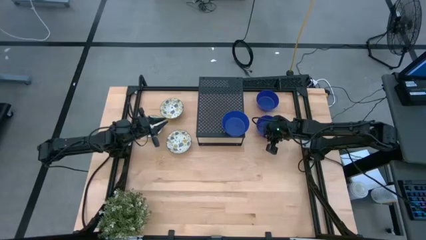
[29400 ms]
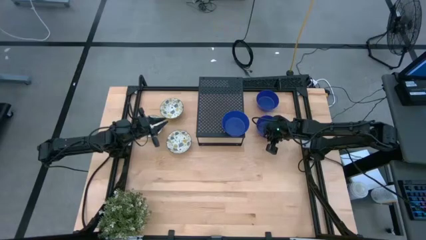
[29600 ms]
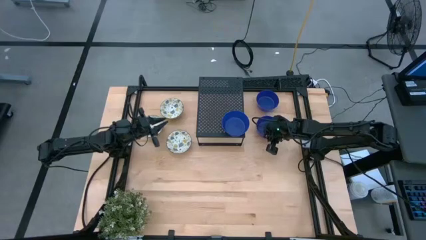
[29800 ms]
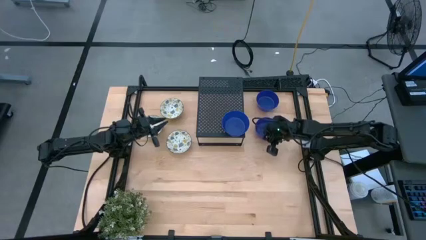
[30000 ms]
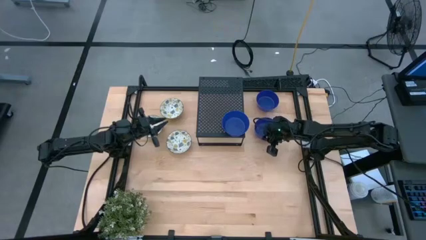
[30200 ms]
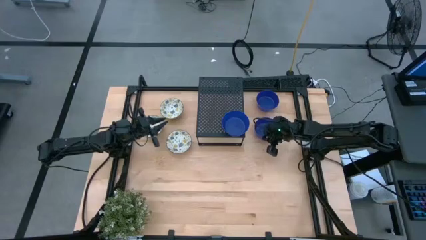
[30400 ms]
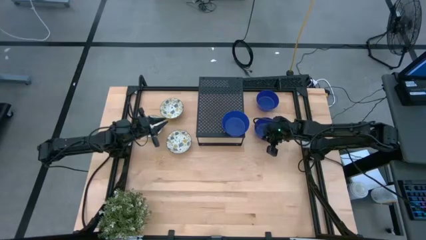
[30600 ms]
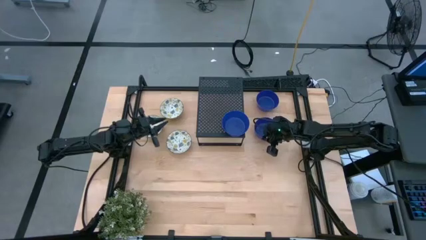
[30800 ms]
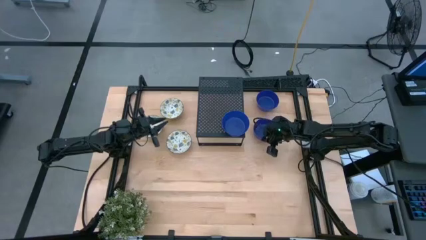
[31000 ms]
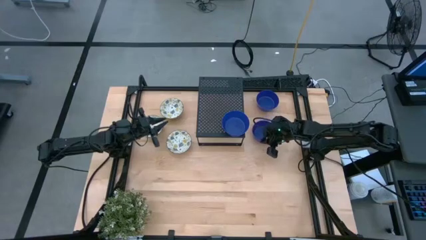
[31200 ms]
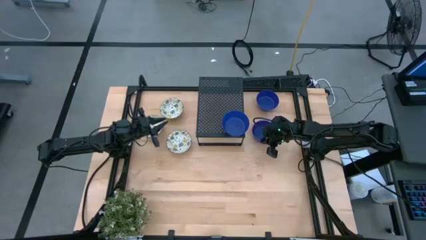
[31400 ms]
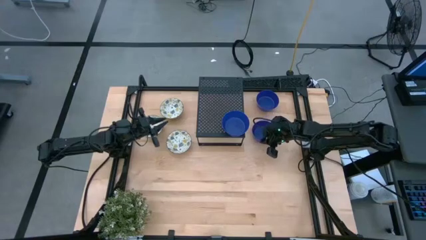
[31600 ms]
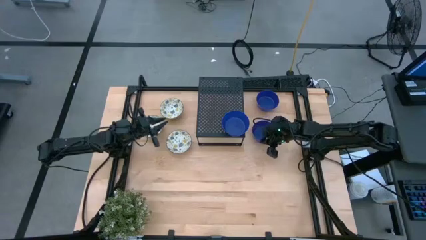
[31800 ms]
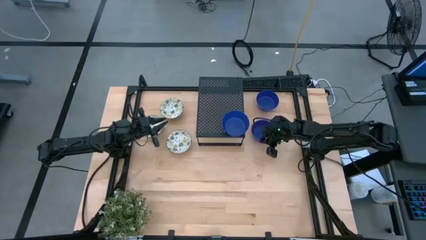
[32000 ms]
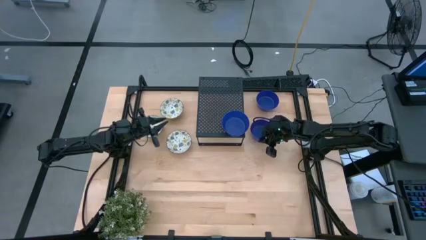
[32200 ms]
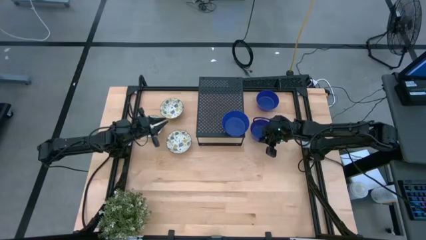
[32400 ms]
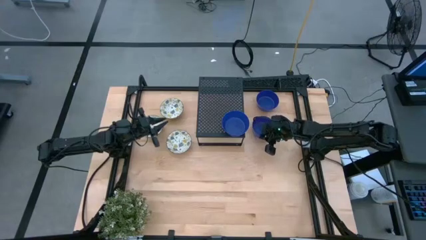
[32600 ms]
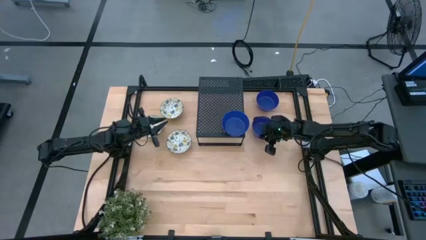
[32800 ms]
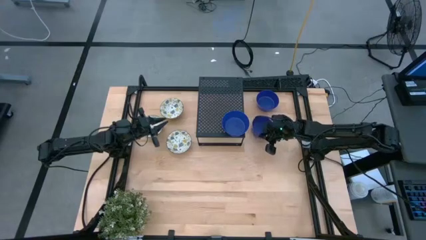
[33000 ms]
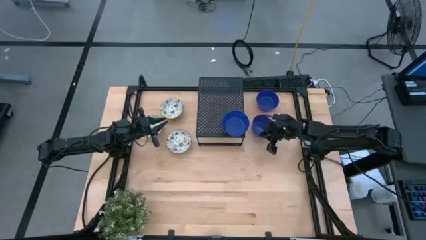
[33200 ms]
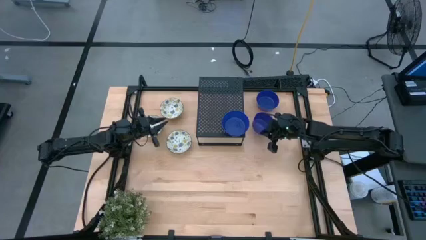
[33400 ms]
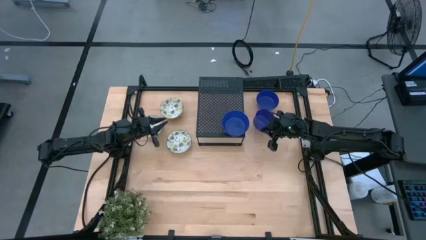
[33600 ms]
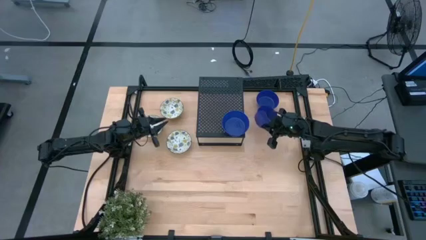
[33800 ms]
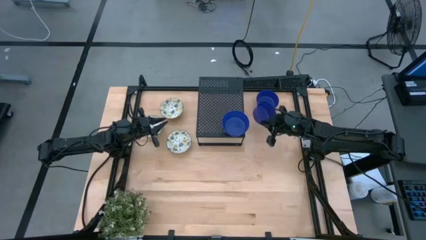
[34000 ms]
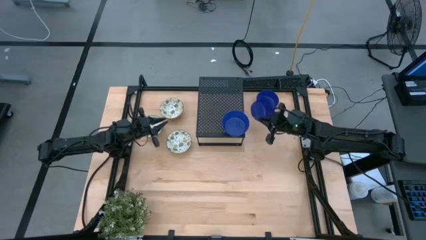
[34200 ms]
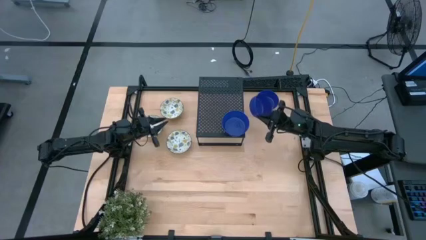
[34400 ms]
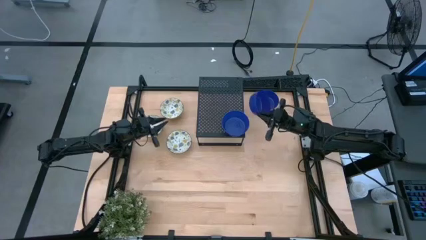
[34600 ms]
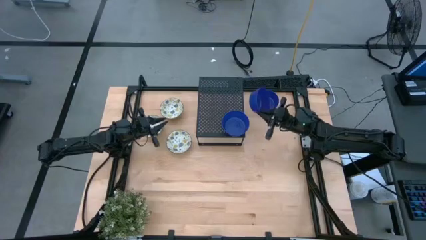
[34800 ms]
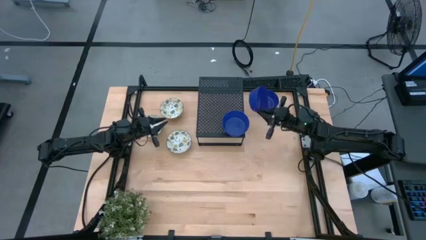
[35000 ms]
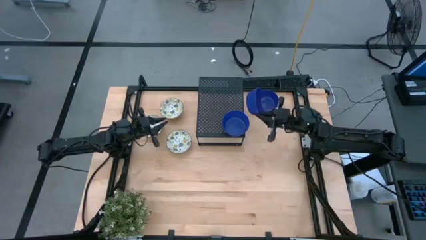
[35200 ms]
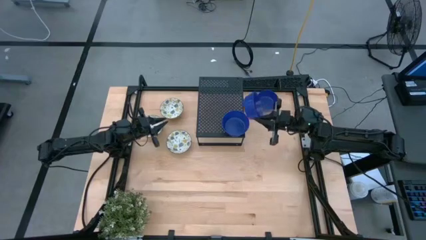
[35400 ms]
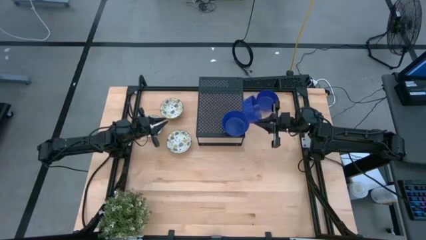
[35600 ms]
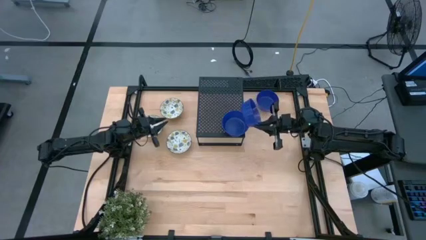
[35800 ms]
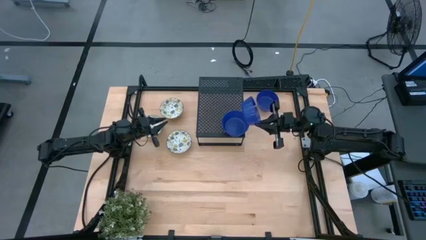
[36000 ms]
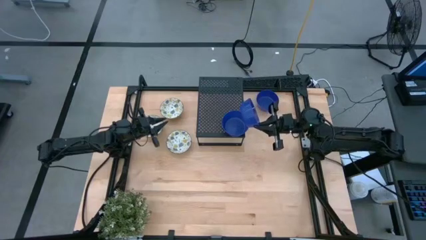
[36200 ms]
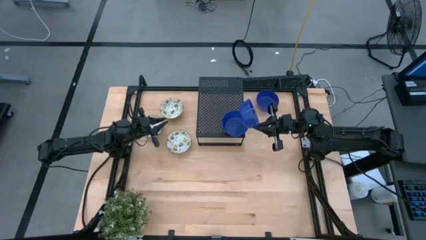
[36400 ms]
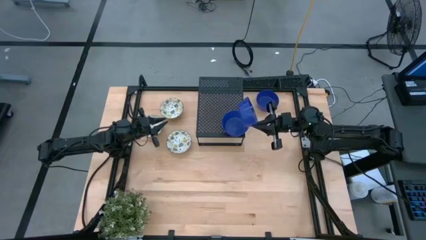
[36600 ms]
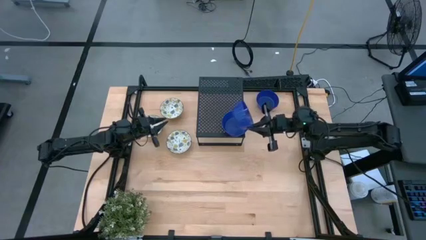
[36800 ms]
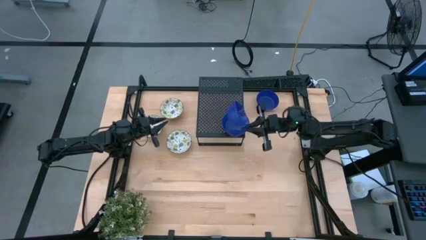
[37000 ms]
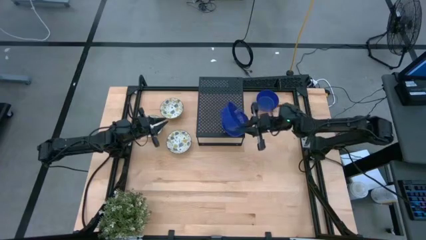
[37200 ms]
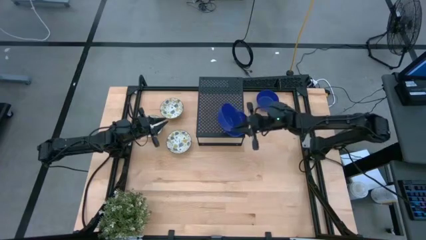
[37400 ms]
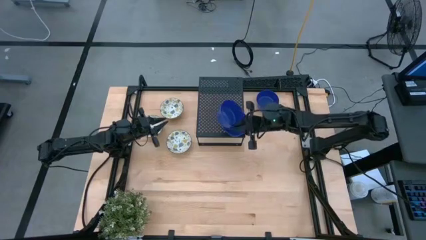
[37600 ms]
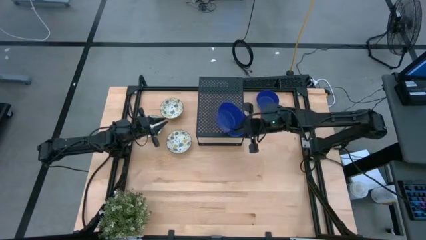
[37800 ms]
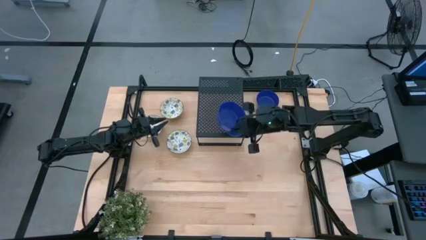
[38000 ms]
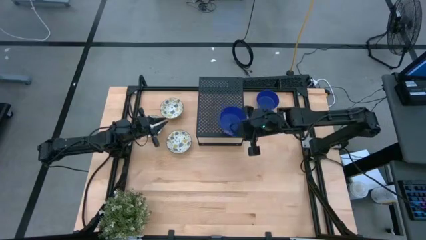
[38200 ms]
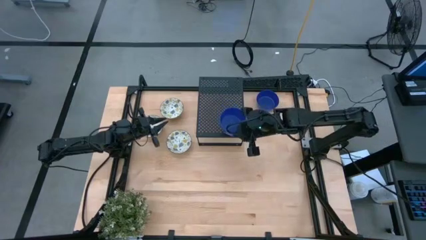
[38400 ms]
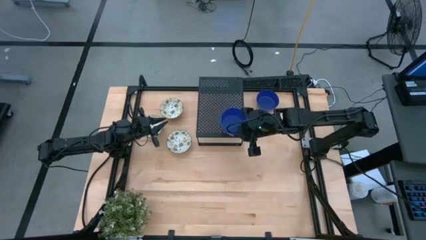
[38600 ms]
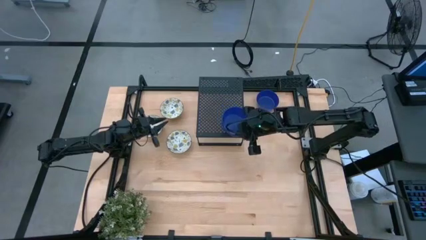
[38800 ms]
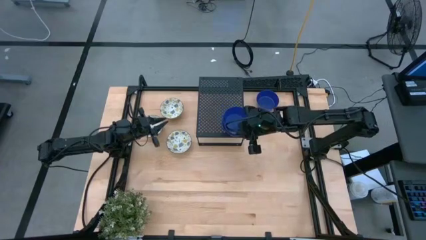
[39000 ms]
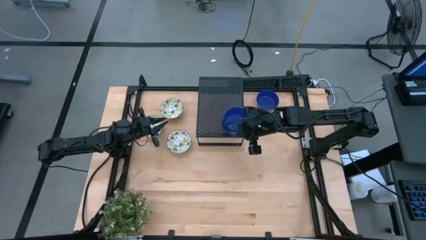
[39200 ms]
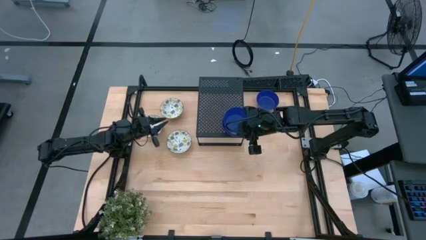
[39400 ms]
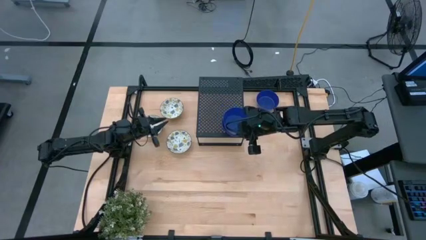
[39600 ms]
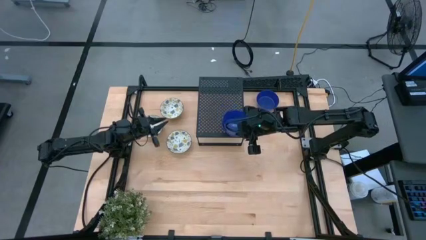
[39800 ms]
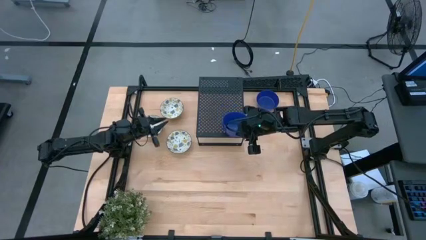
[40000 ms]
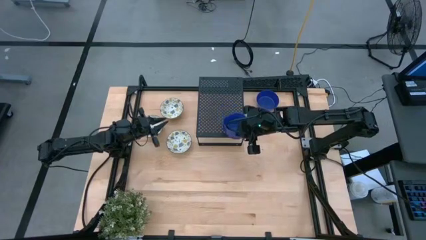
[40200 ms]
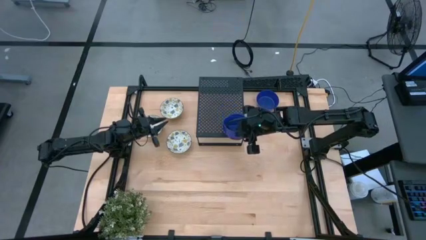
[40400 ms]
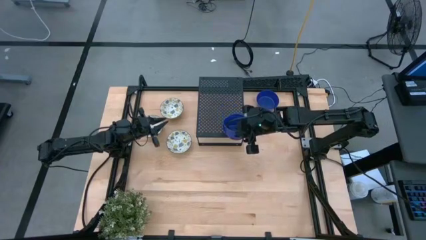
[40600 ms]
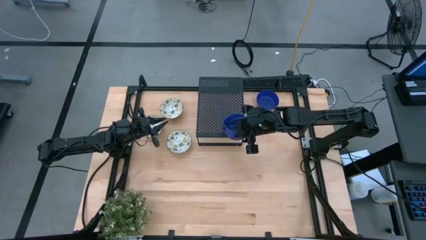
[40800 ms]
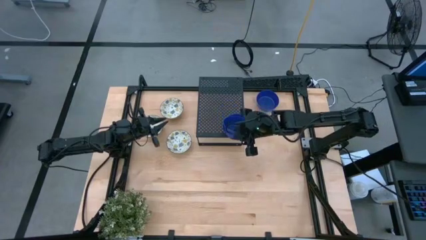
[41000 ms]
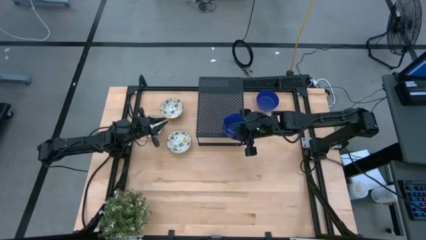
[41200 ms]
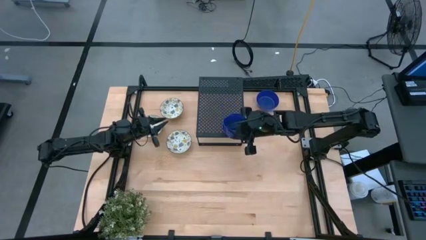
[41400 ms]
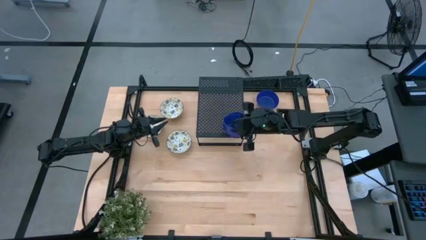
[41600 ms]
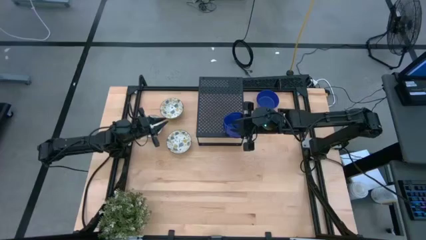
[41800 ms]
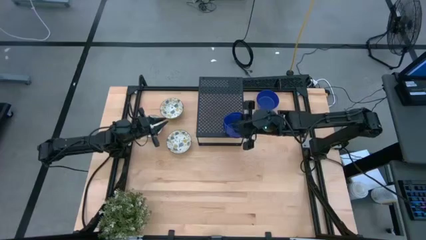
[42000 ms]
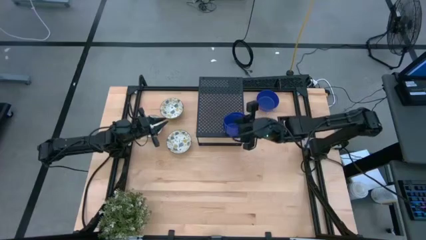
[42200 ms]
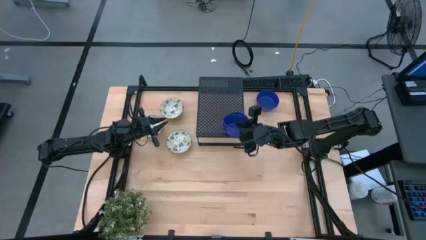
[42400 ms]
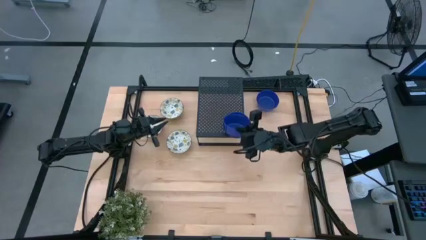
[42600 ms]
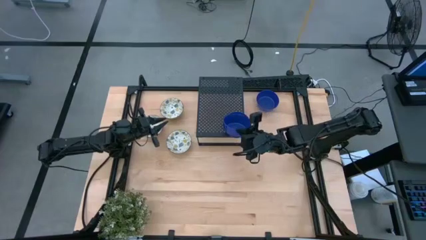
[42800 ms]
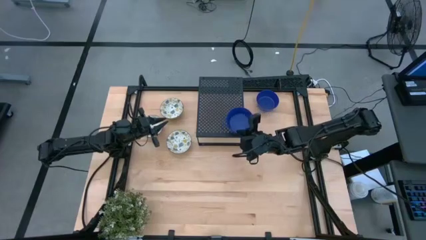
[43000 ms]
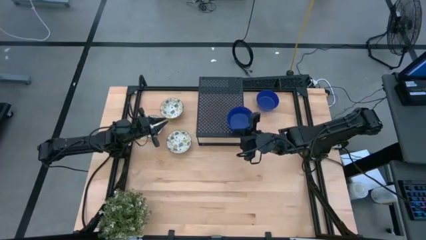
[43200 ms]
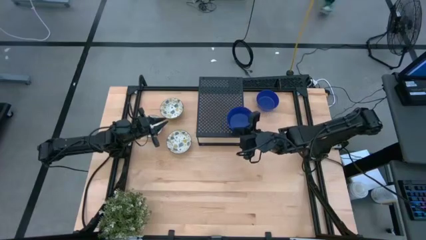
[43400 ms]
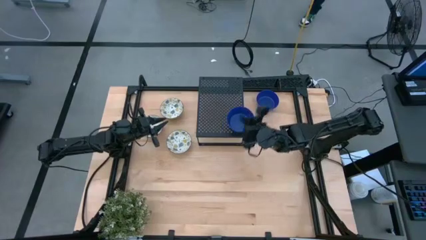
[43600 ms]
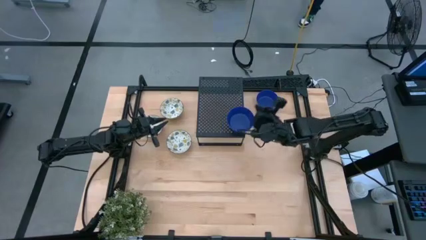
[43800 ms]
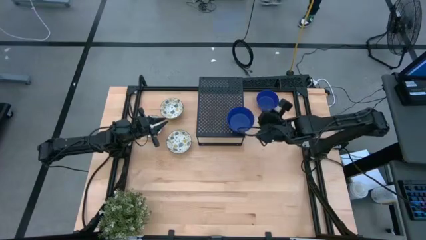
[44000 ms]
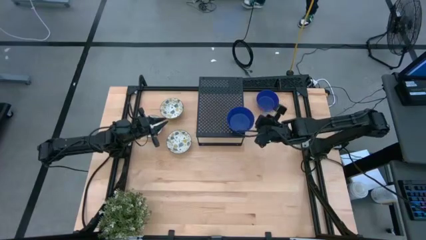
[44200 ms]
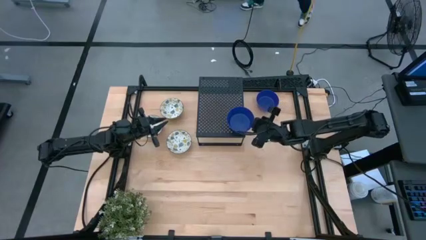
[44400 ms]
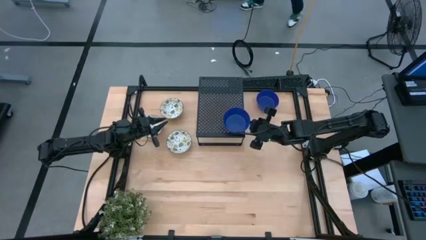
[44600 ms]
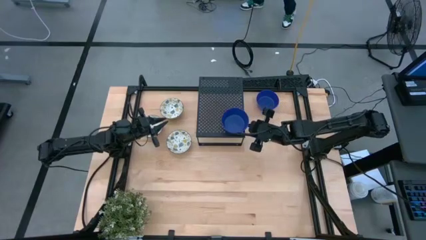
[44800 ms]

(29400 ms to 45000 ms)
Task: Pick & Place Mini bowls
Stack the bottom blue bowl on the blue bowl on the shelf
